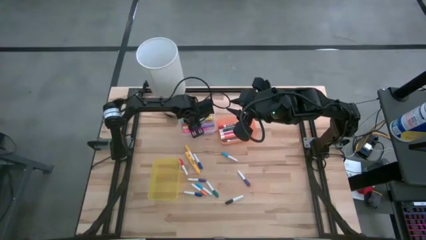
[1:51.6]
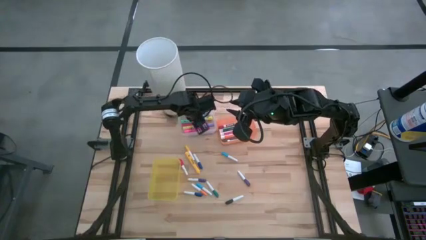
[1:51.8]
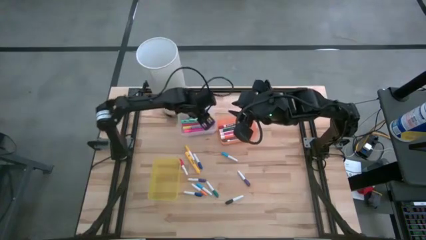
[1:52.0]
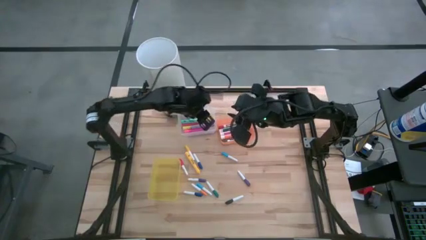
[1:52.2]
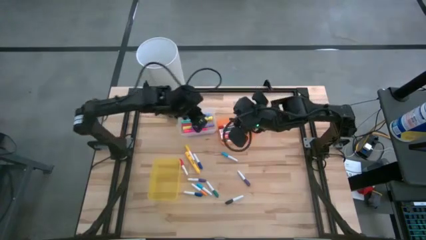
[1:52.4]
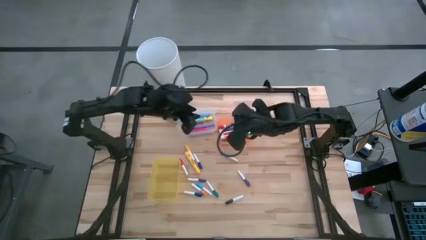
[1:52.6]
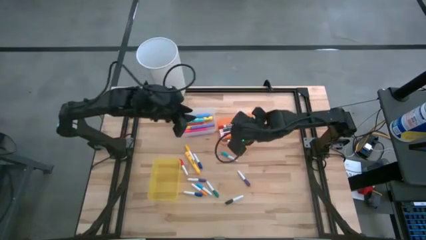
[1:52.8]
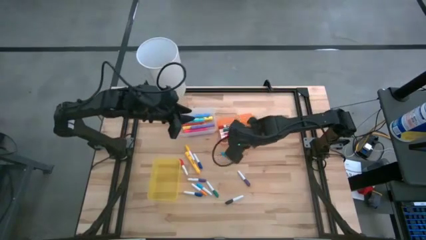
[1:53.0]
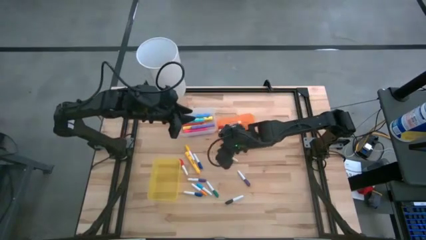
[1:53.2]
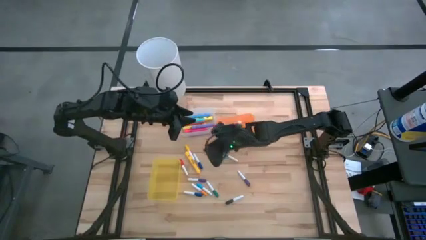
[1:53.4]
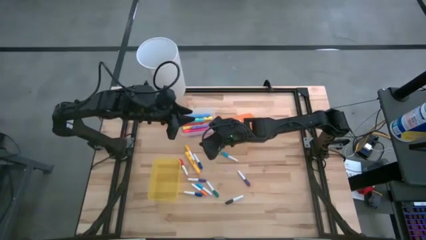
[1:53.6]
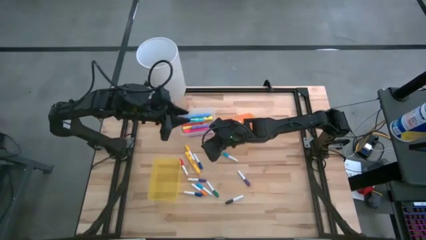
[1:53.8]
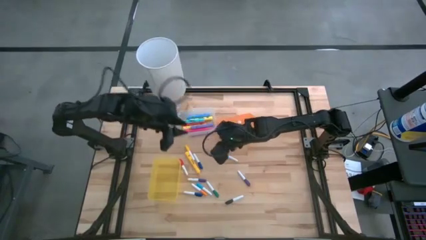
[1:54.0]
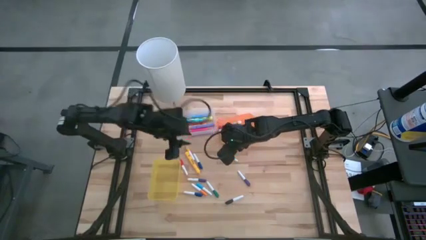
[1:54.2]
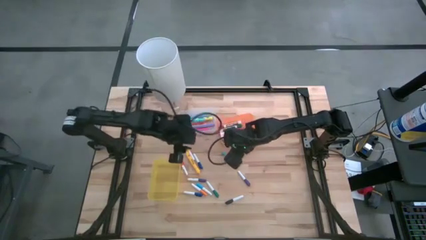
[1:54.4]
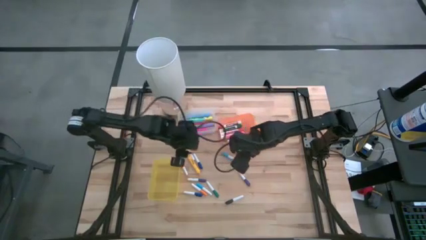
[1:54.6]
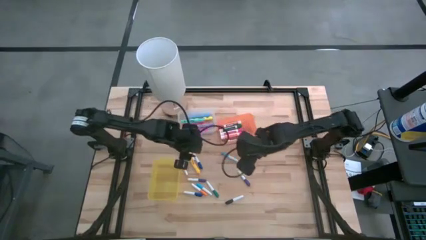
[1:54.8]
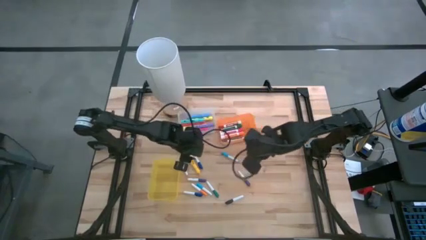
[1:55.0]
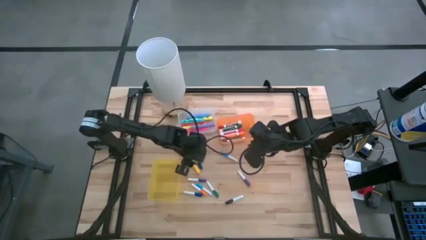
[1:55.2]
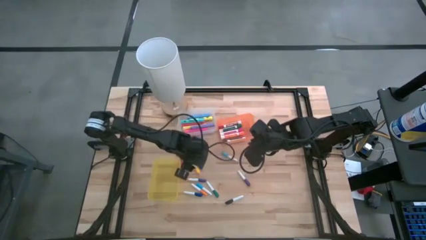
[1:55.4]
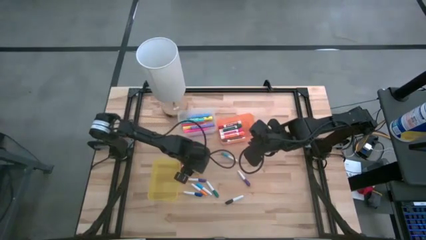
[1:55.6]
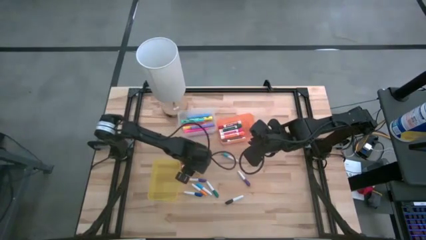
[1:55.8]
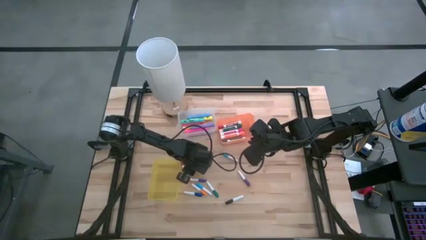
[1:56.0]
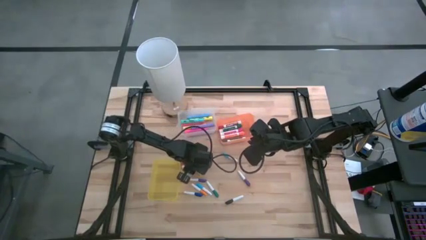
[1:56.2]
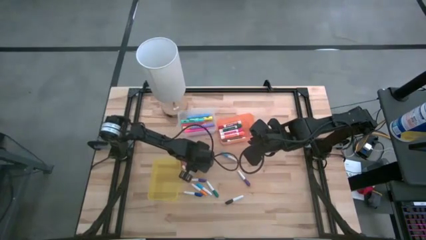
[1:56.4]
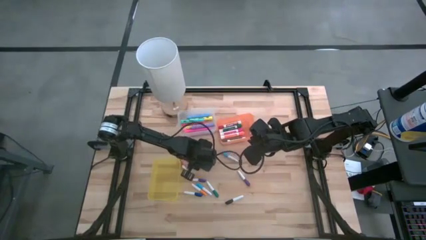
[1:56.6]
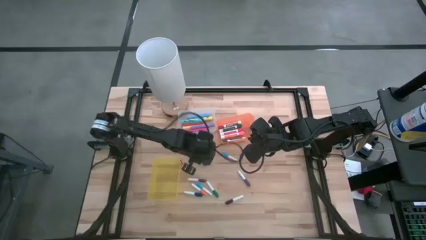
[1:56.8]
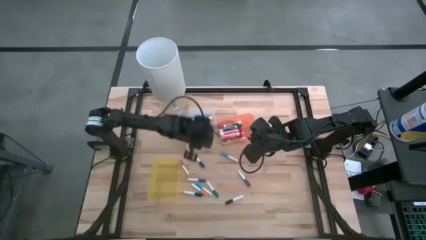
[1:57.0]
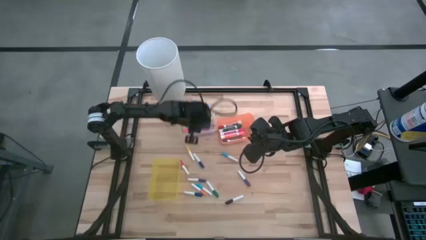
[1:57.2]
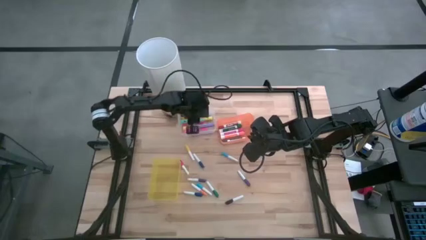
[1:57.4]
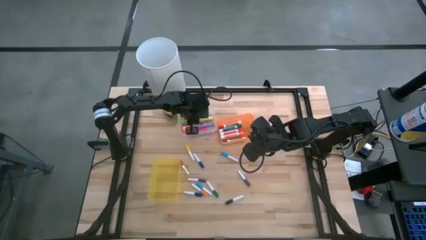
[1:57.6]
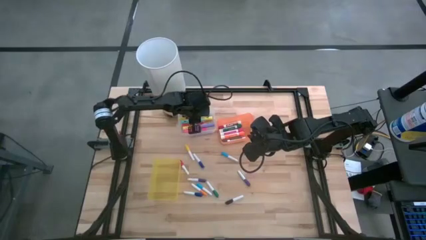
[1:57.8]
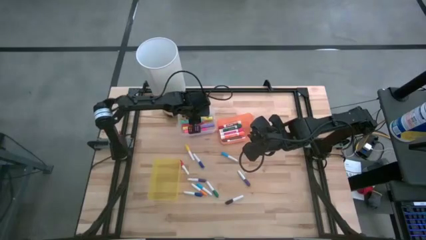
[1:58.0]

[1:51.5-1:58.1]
Task: Pick & Place Markers
Put the yellow highlighter into the transparent bin

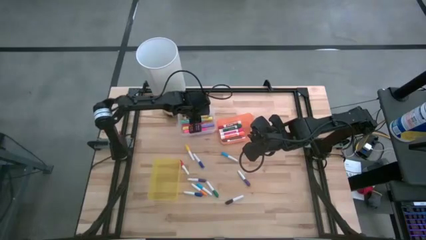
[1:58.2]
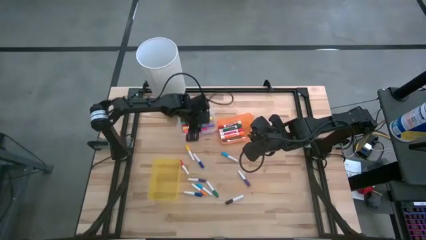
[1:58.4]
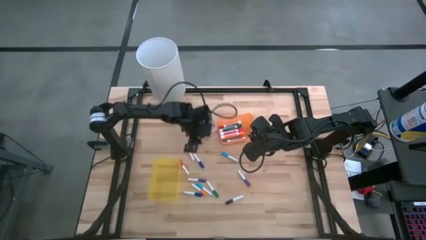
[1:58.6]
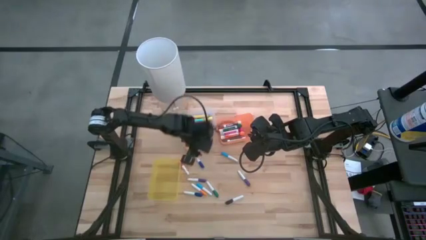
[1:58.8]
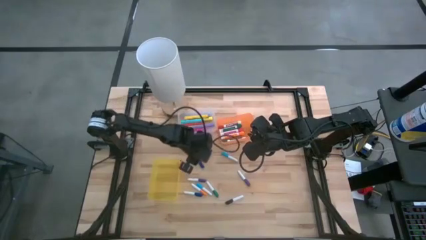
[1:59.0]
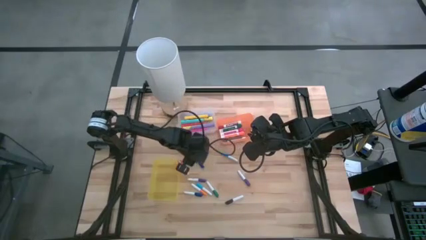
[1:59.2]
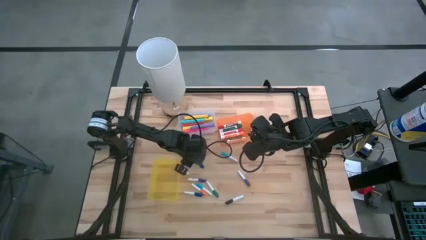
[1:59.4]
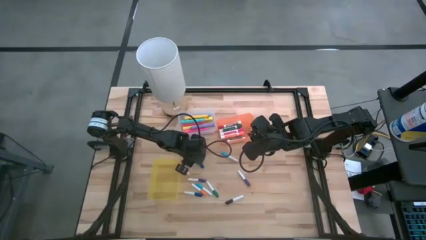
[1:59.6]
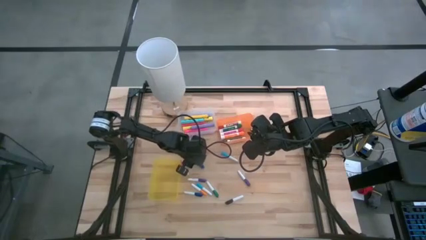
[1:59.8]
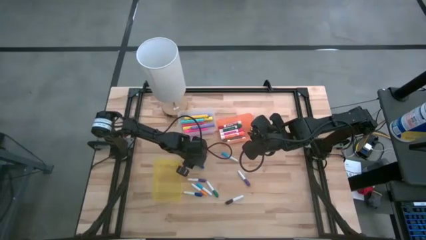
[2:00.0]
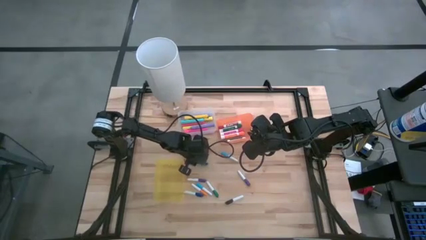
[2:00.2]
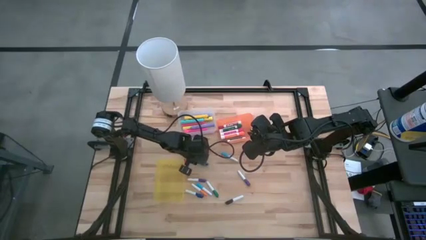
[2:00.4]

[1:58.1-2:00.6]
Put the top dark blue pen into the yellow bin

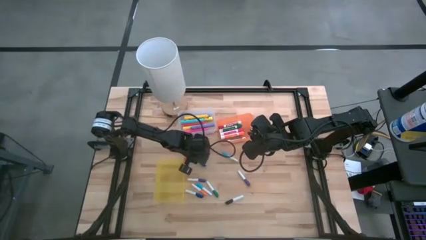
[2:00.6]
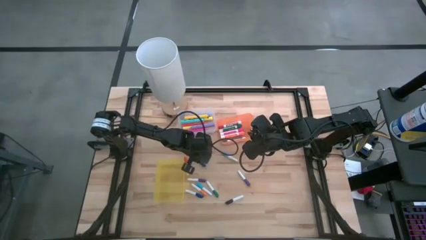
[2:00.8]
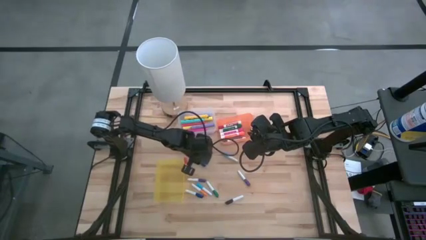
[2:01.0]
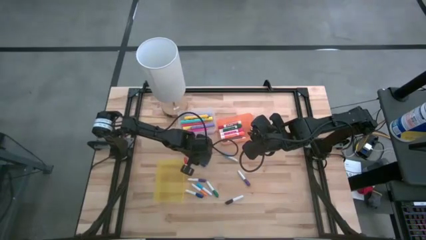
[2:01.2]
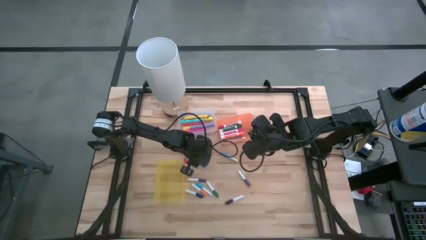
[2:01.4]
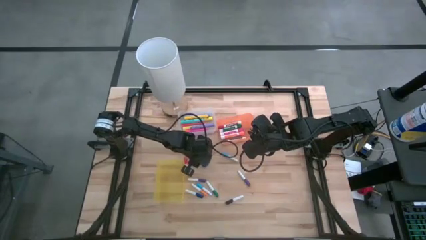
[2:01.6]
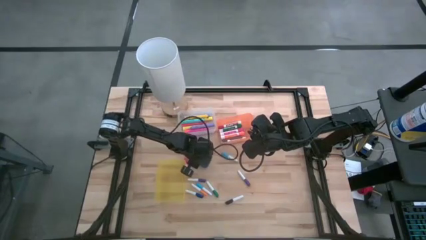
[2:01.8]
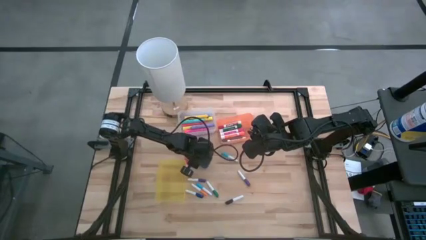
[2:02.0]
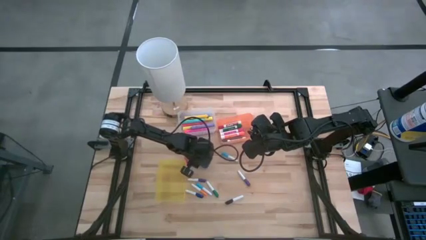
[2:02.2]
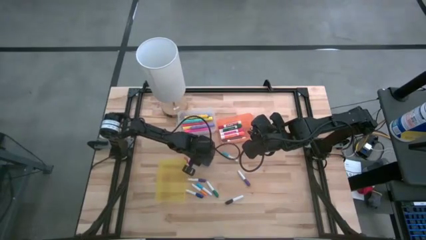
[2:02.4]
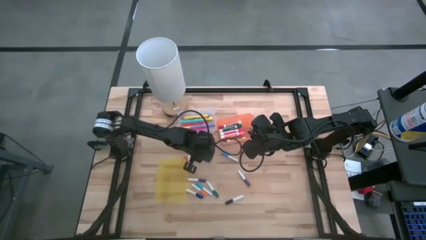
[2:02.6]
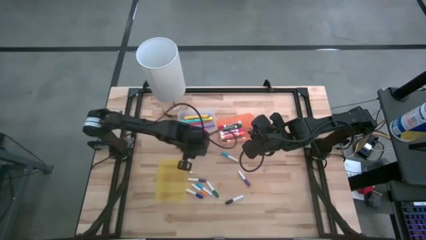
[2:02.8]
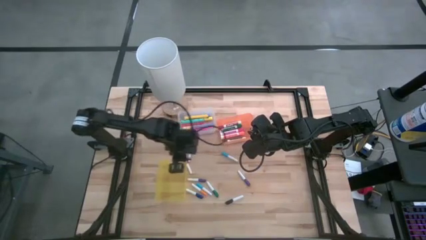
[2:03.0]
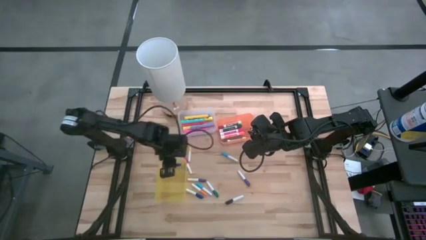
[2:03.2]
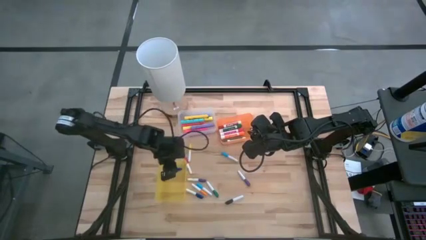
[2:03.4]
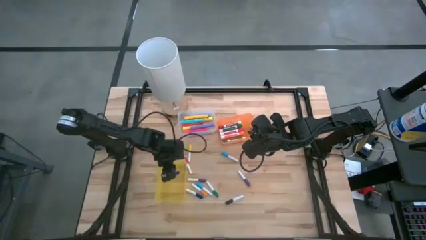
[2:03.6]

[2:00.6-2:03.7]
Put the top dark blue pen into the yellow bin

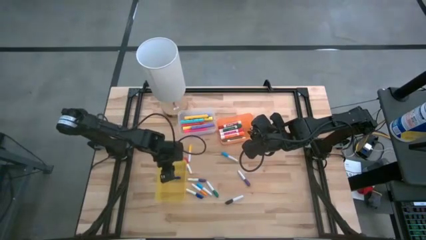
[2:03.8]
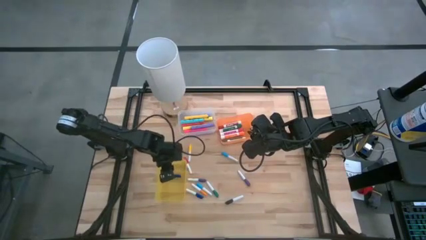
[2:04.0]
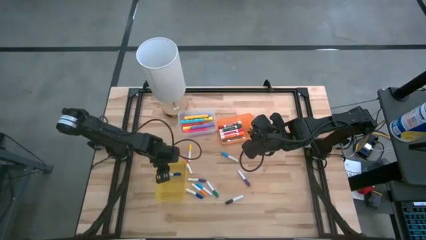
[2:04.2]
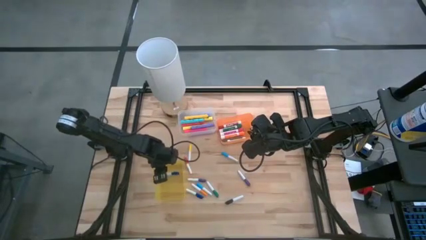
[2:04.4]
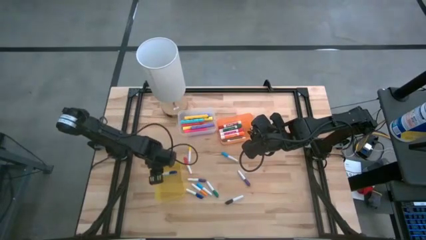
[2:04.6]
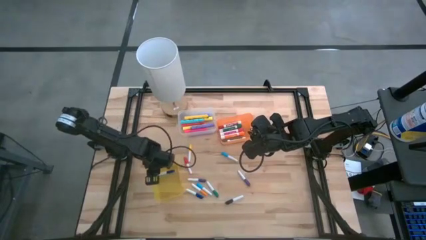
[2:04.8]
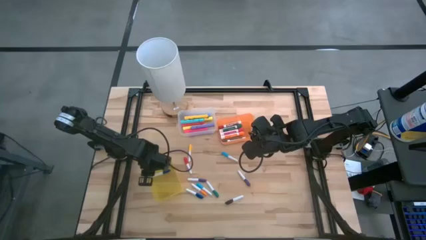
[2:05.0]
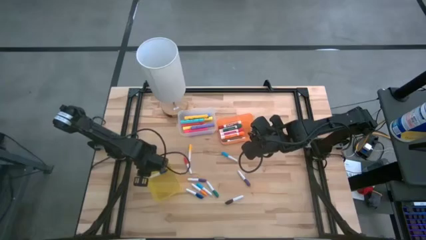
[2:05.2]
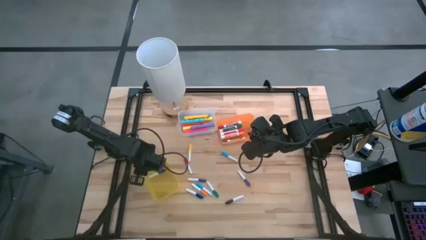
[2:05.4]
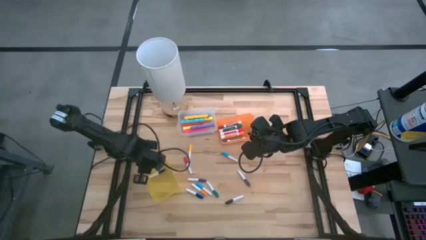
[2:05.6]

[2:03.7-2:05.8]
Adjust the yellow bin

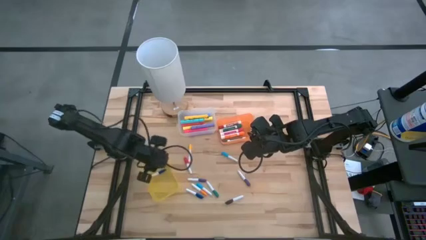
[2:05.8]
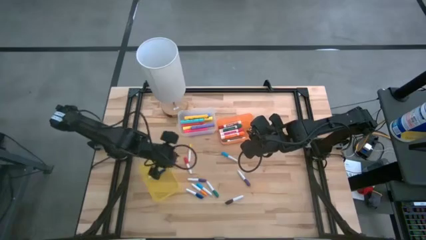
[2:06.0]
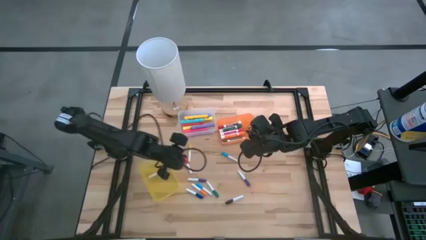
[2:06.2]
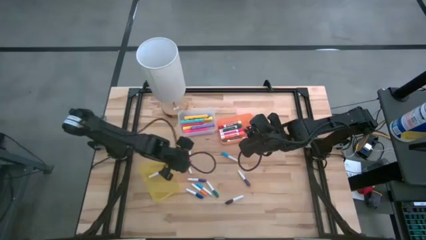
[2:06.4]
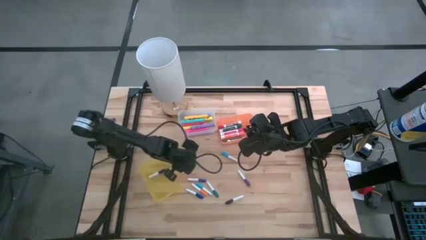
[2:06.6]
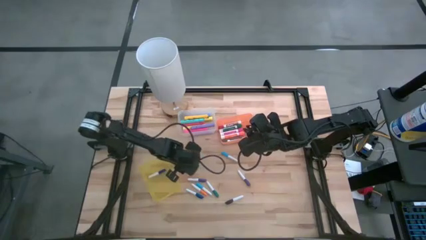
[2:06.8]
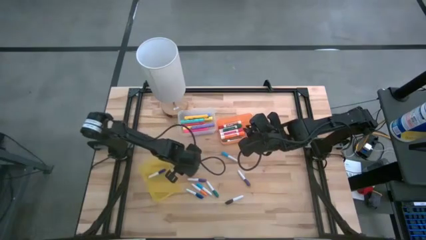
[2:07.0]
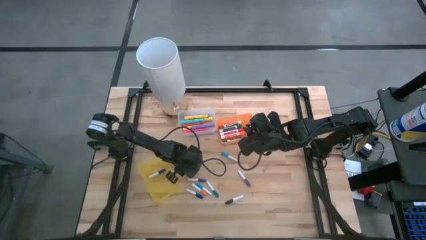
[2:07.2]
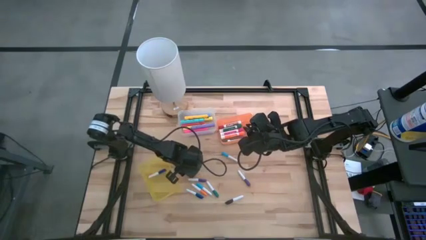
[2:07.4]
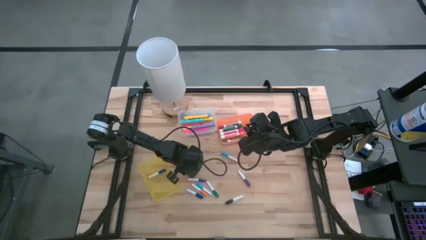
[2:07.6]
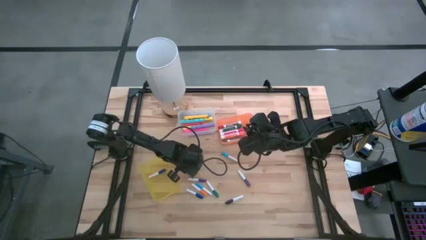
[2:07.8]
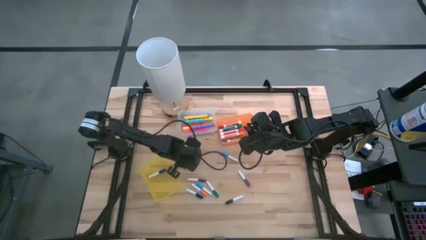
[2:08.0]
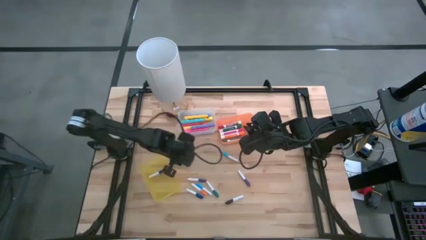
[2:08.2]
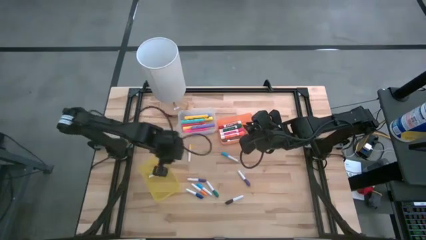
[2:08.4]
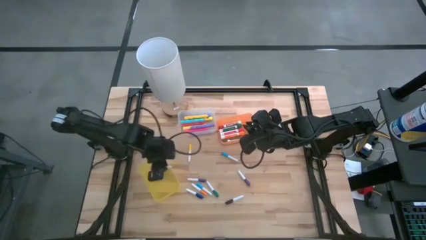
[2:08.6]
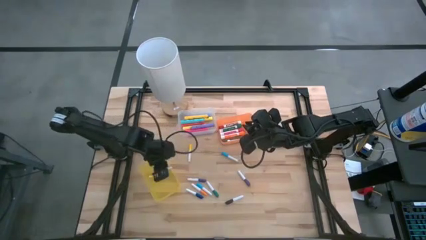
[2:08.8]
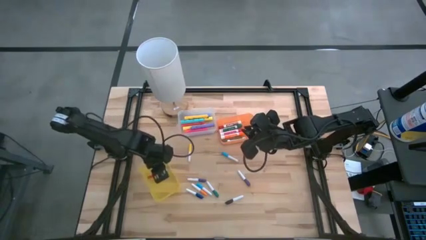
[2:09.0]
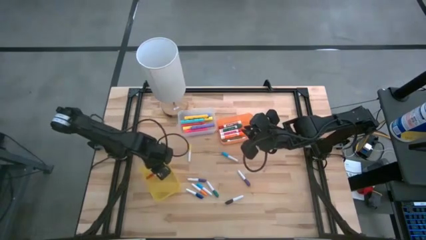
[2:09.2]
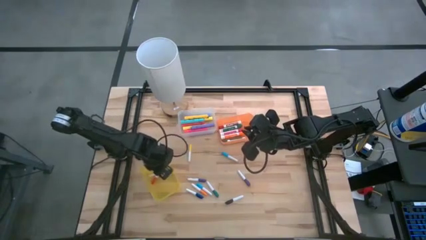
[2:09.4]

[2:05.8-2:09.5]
Put the red pen into the yellow bin
